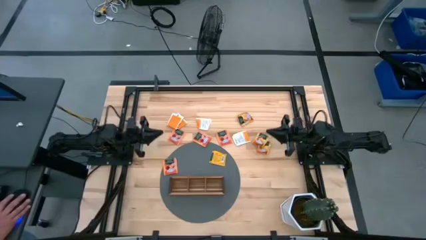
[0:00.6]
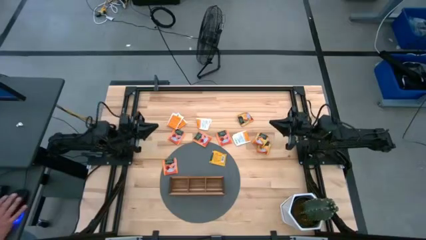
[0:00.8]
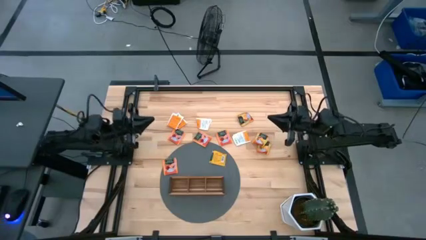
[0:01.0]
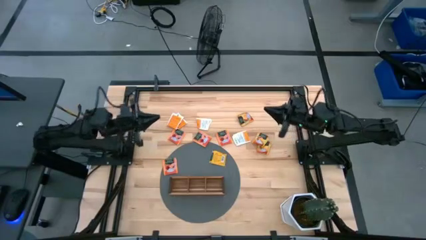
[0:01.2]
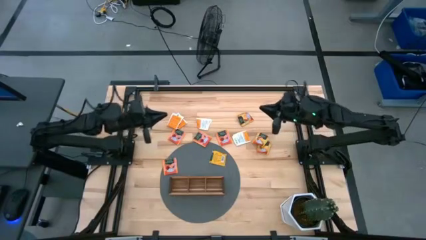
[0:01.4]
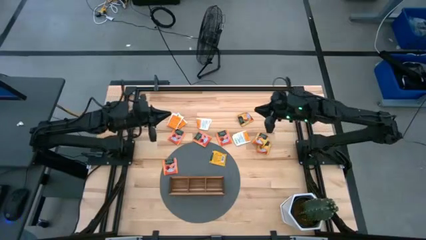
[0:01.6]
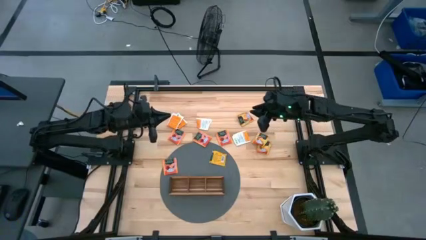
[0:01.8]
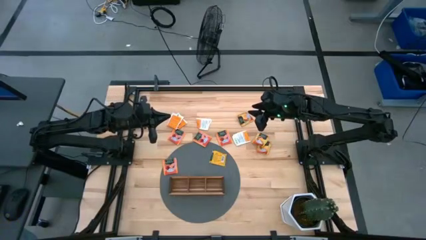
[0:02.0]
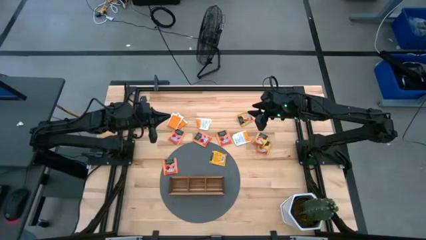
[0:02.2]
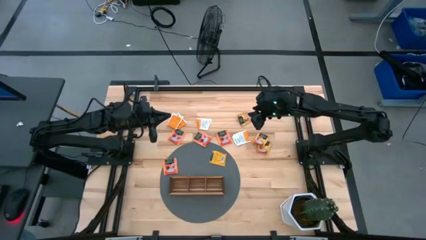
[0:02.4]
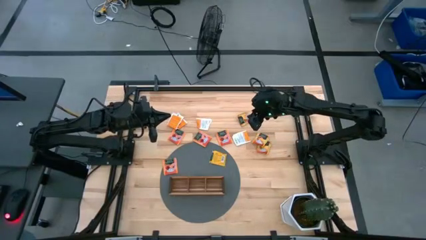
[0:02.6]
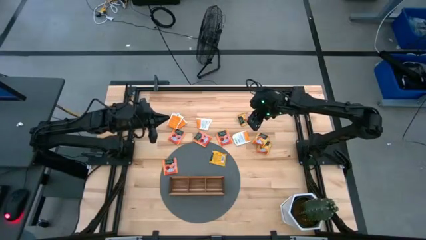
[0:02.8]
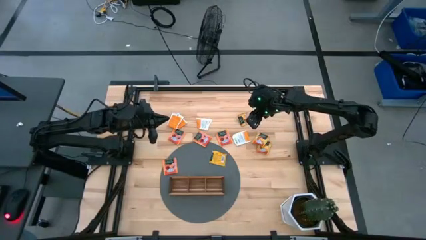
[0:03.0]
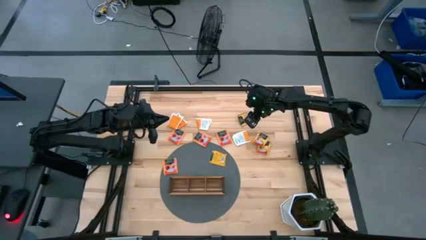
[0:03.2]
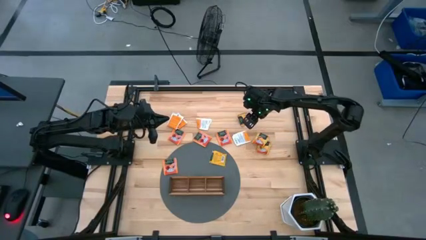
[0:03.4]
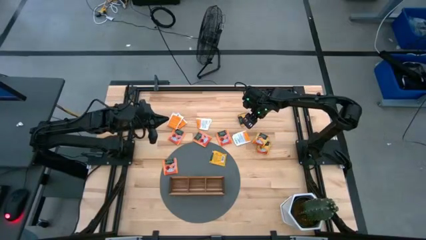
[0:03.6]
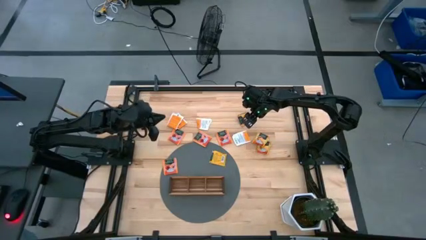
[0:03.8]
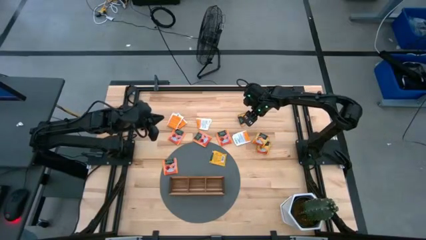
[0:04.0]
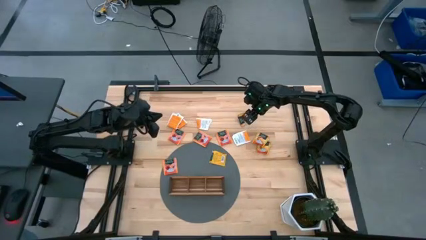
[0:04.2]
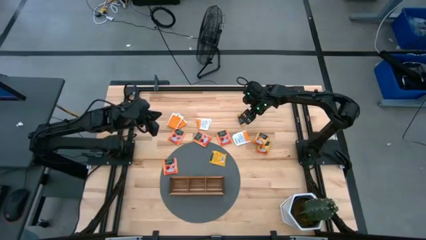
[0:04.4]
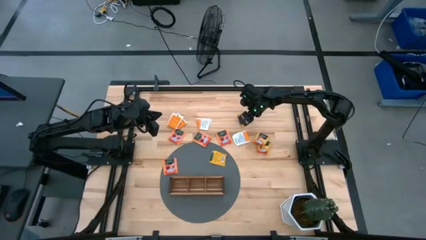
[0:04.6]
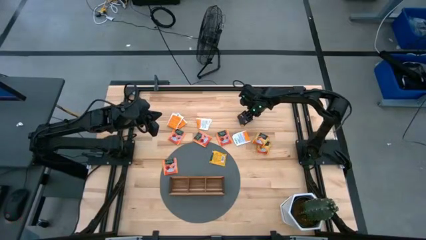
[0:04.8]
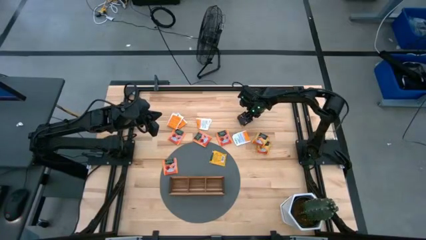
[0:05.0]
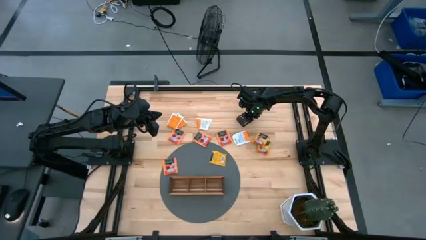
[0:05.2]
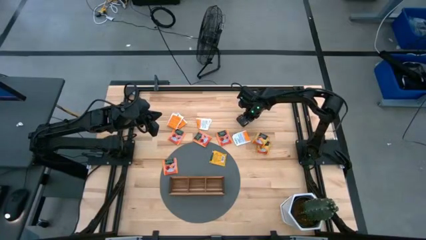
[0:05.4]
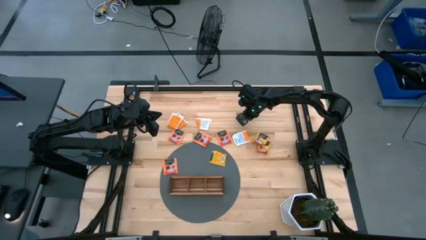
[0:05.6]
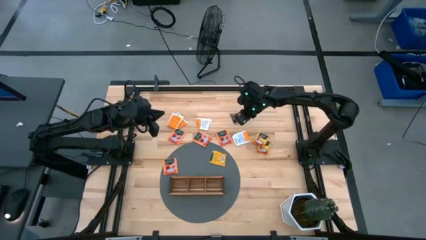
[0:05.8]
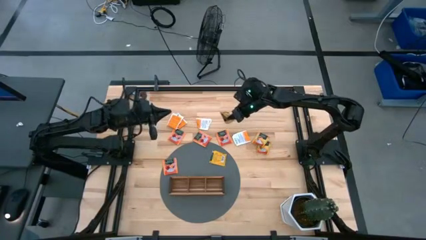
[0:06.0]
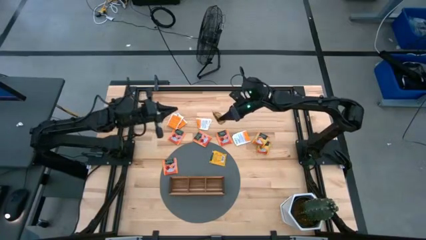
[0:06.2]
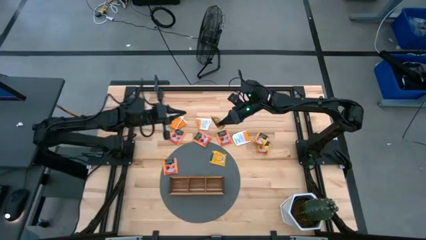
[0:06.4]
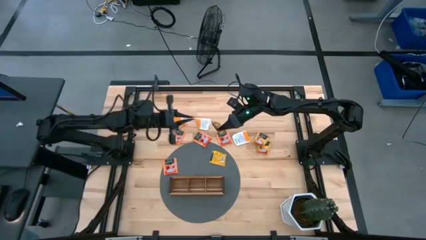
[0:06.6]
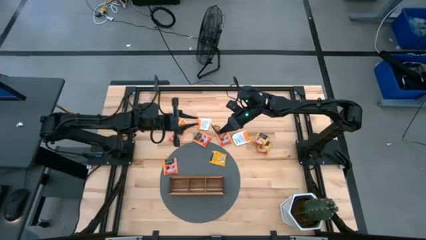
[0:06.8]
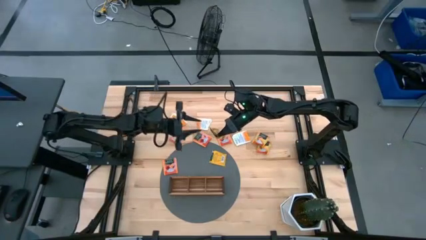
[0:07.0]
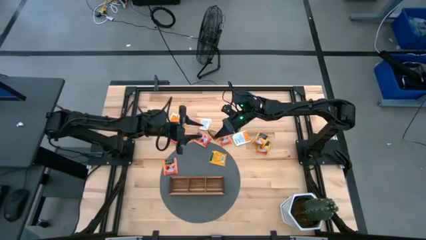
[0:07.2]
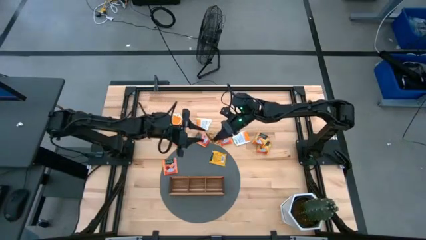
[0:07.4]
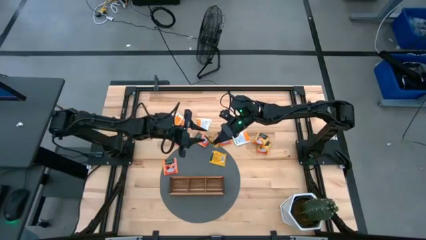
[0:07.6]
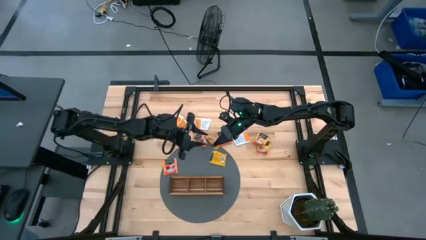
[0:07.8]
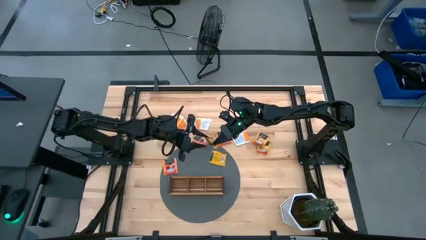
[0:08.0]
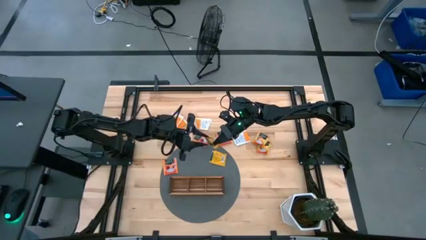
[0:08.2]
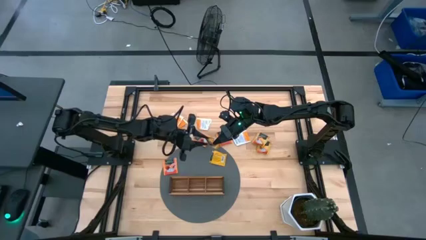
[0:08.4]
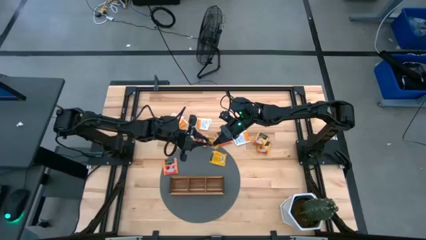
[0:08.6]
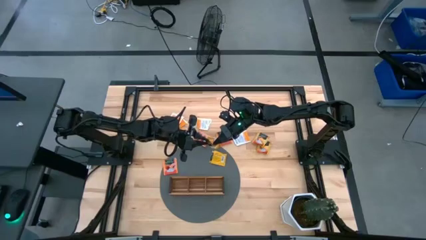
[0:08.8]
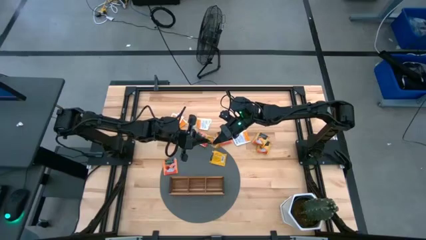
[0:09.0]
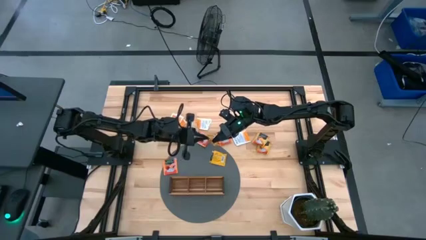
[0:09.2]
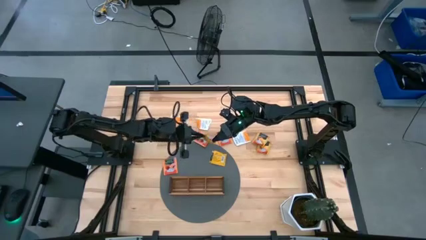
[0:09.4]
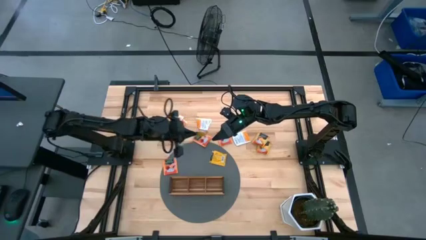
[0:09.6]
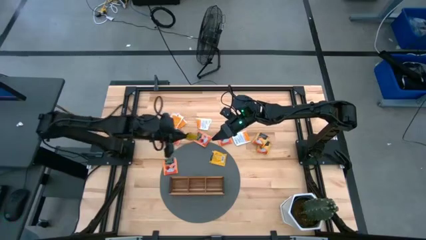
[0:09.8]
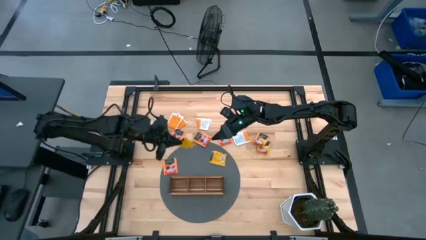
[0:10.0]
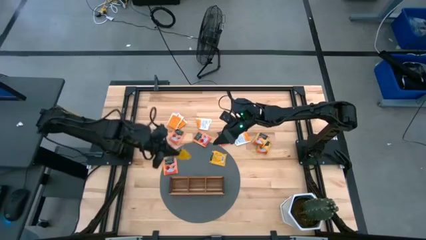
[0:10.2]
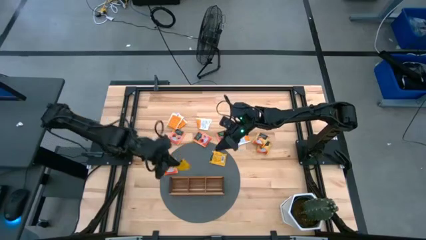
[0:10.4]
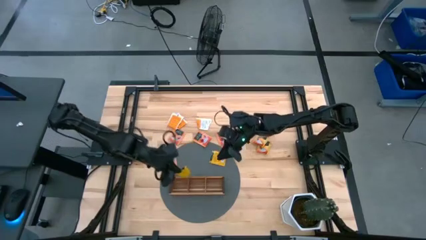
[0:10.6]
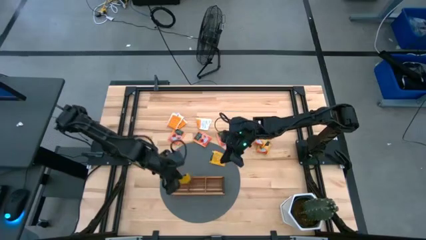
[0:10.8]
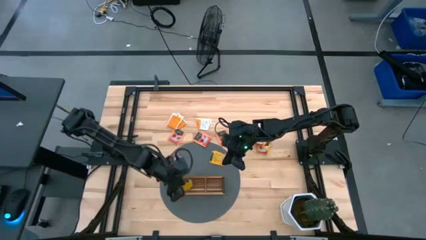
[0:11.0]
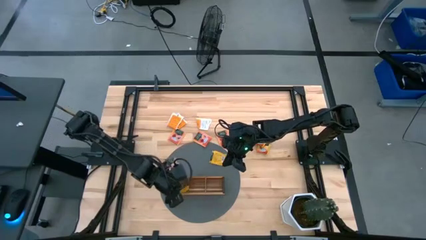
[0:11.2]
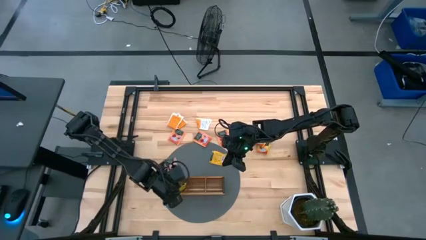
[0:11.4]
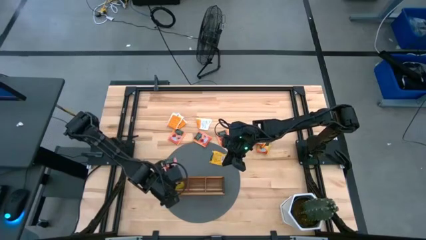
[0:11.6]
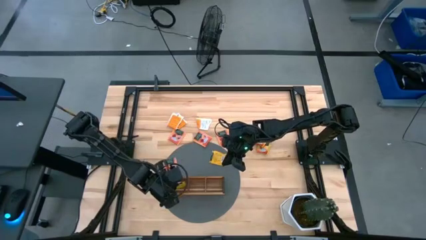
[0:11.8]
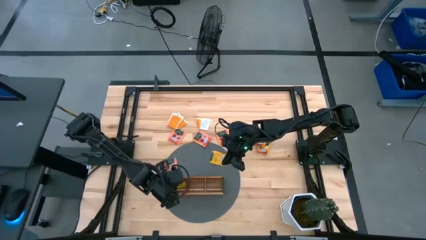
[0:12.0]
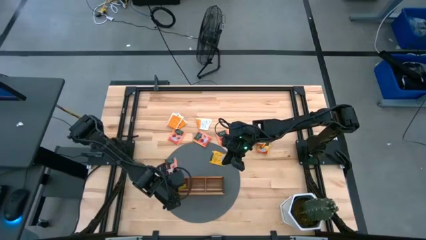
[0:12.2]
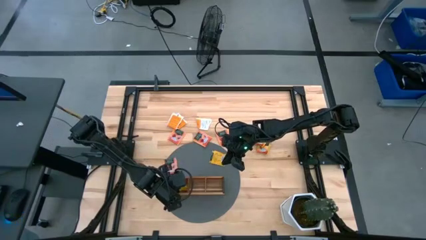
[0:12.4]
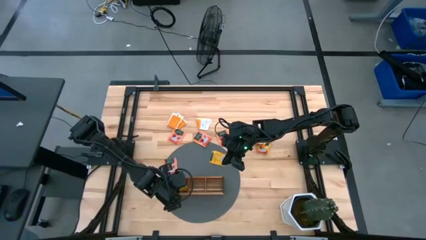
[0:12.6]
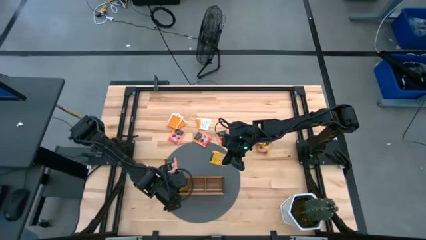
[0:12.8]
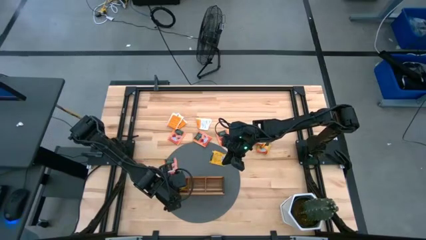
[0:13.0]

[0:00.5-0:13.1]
Task: Pick & Place Tea
Put the yellow tea bag into the left section of the wooden organizer
